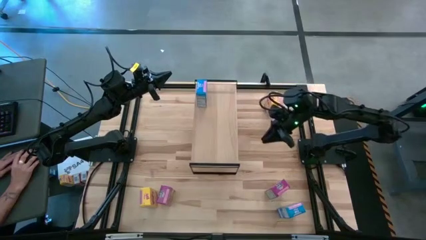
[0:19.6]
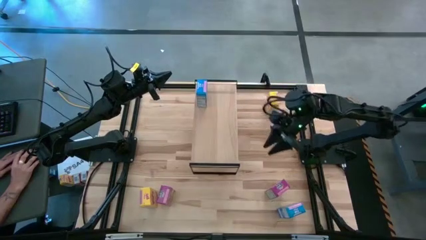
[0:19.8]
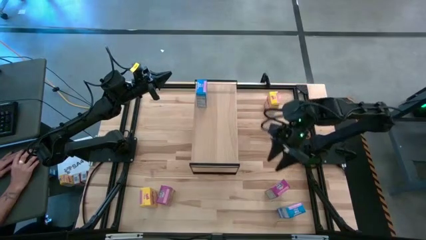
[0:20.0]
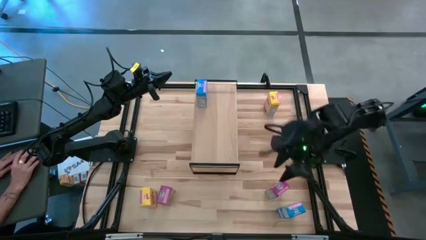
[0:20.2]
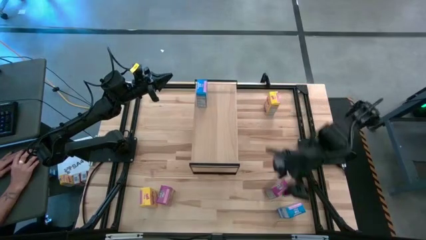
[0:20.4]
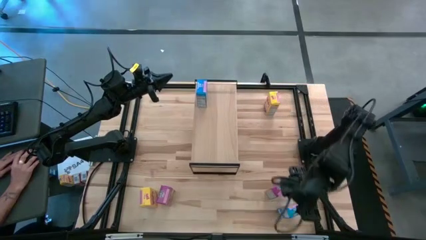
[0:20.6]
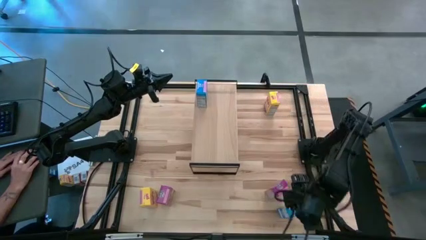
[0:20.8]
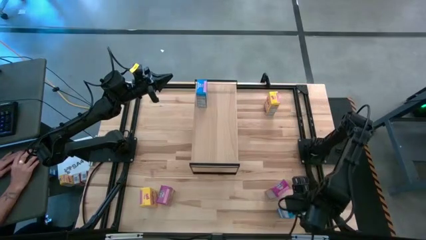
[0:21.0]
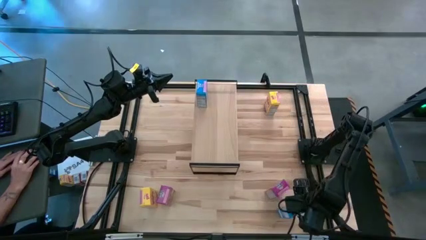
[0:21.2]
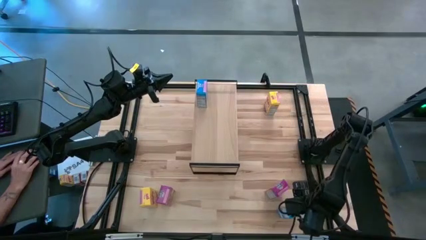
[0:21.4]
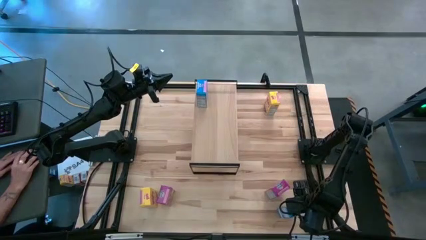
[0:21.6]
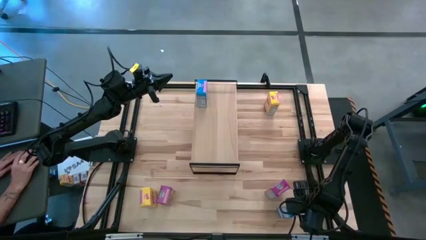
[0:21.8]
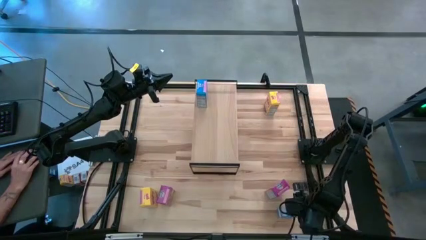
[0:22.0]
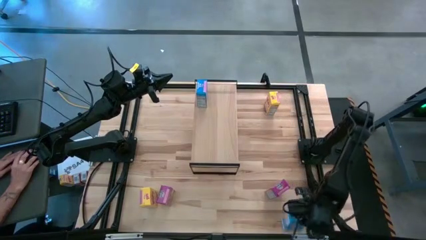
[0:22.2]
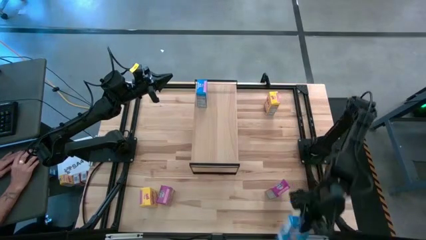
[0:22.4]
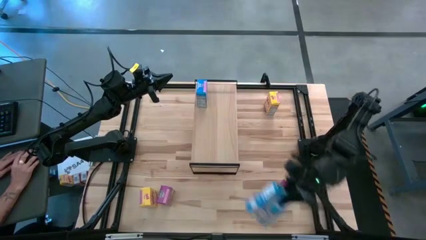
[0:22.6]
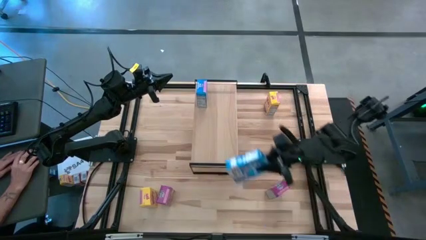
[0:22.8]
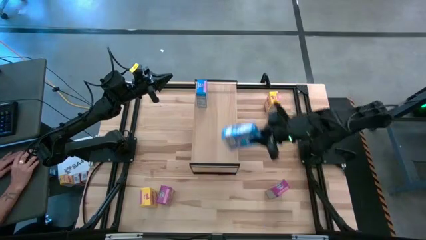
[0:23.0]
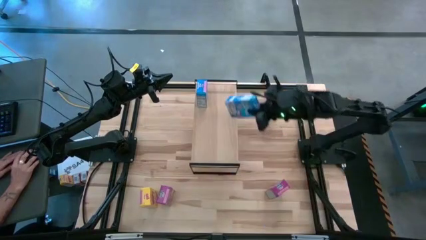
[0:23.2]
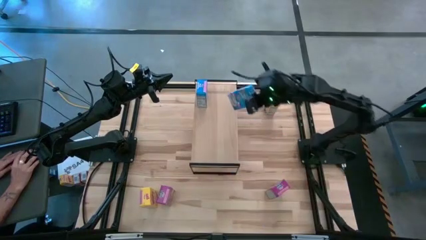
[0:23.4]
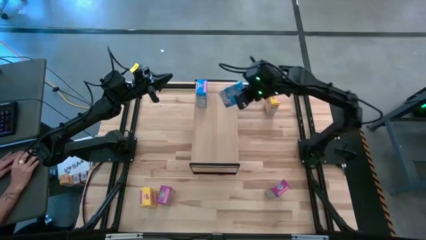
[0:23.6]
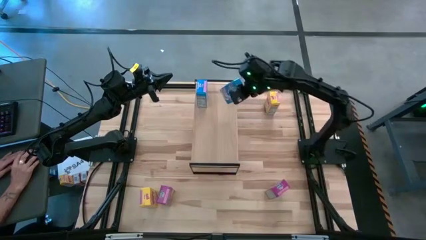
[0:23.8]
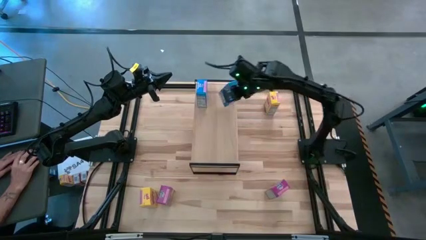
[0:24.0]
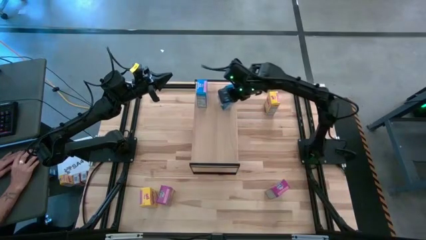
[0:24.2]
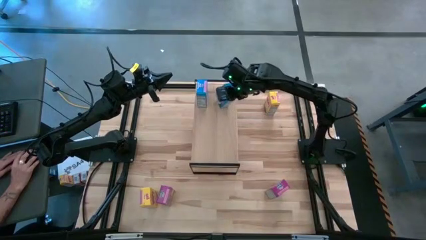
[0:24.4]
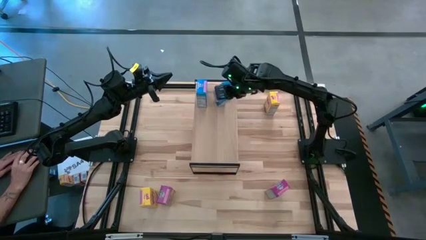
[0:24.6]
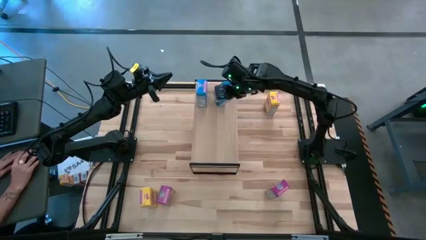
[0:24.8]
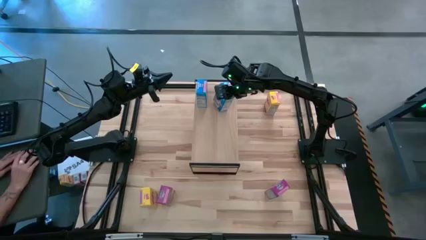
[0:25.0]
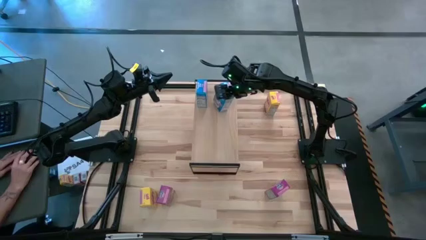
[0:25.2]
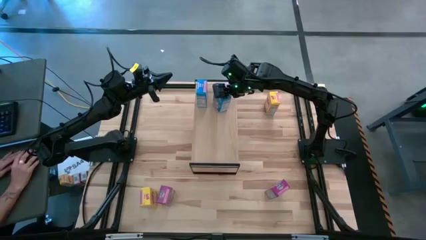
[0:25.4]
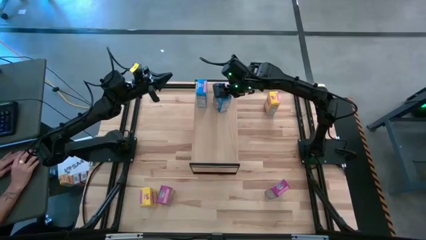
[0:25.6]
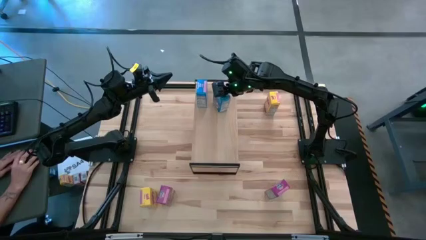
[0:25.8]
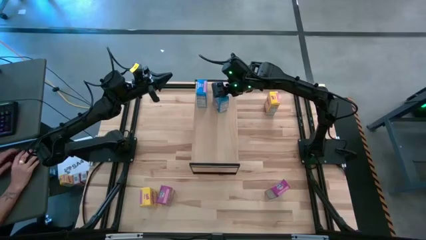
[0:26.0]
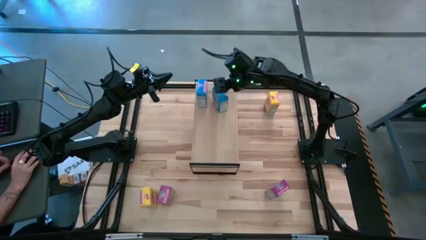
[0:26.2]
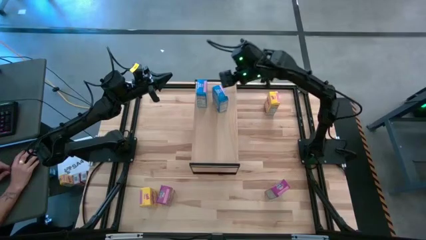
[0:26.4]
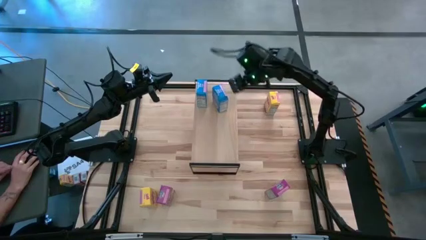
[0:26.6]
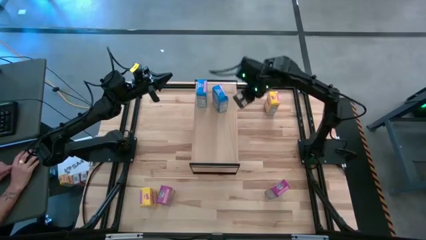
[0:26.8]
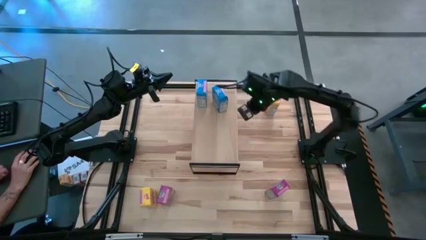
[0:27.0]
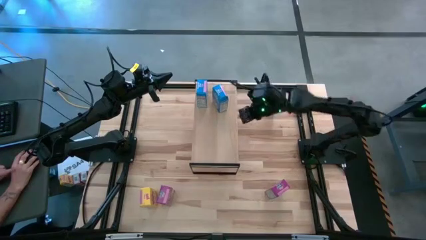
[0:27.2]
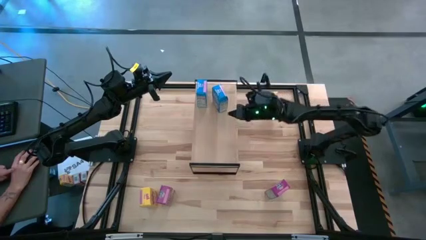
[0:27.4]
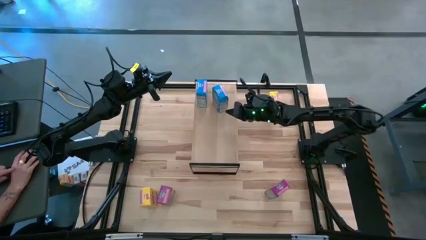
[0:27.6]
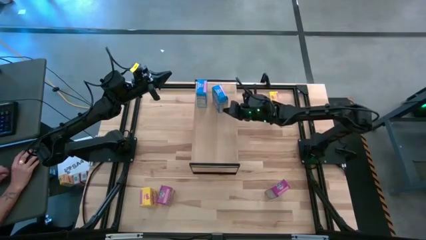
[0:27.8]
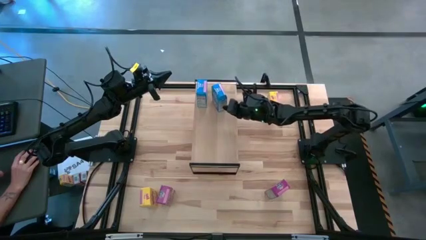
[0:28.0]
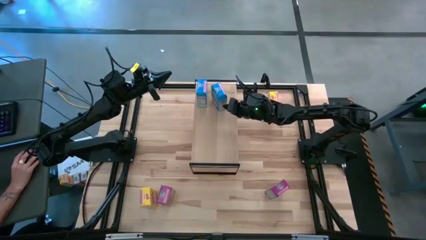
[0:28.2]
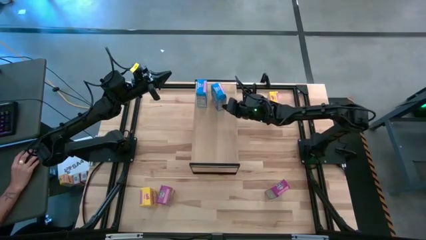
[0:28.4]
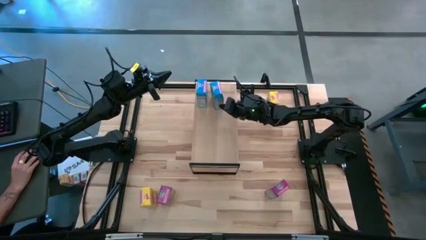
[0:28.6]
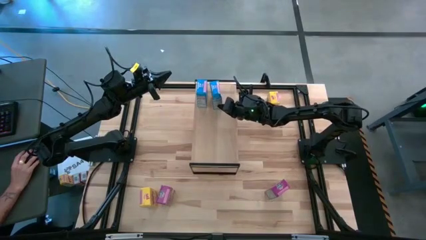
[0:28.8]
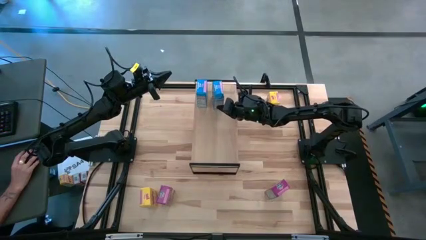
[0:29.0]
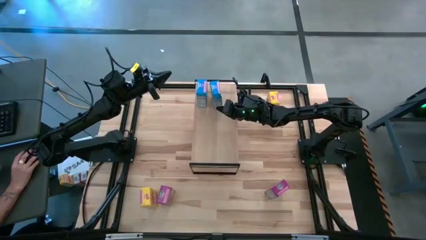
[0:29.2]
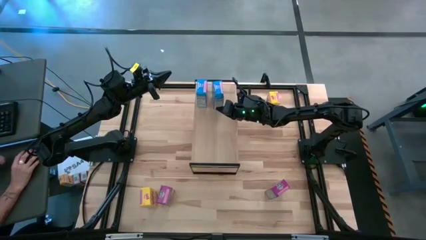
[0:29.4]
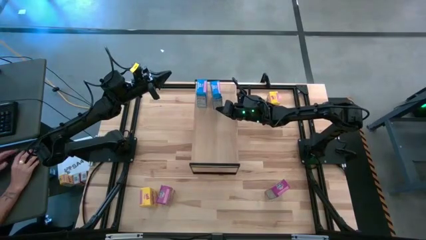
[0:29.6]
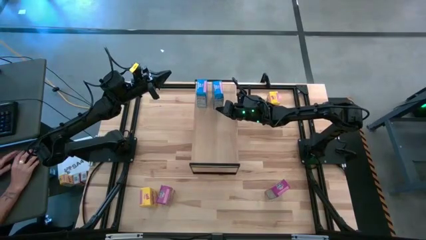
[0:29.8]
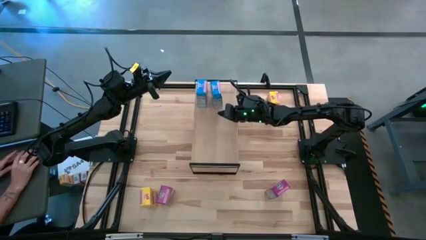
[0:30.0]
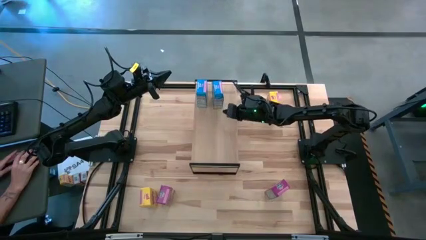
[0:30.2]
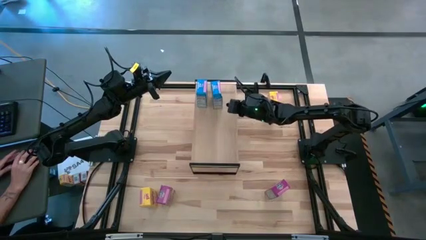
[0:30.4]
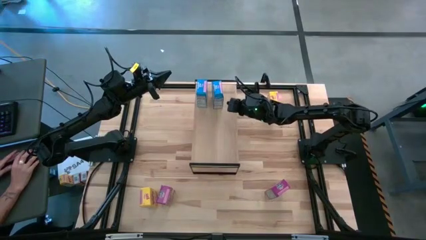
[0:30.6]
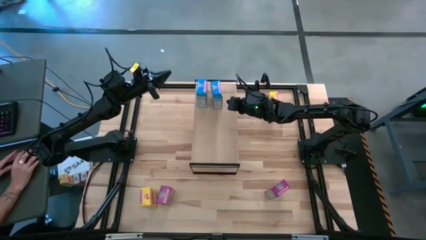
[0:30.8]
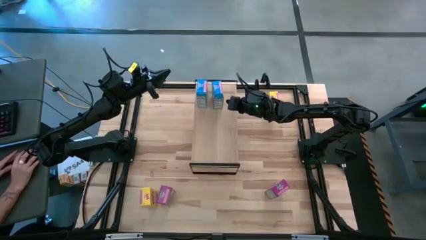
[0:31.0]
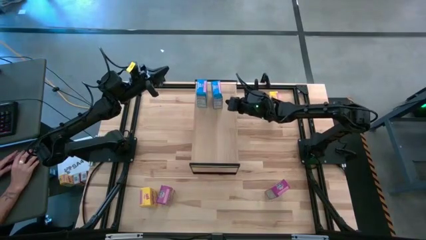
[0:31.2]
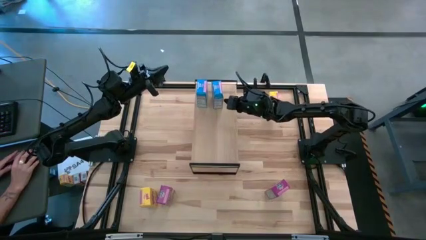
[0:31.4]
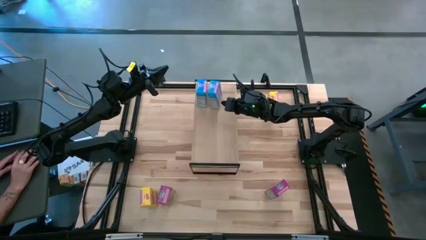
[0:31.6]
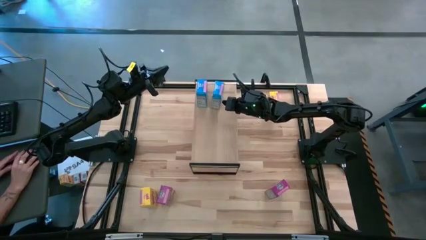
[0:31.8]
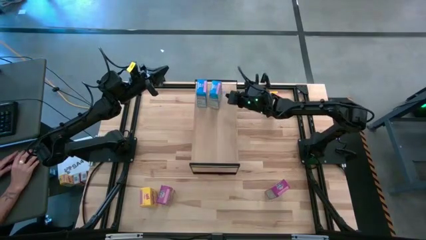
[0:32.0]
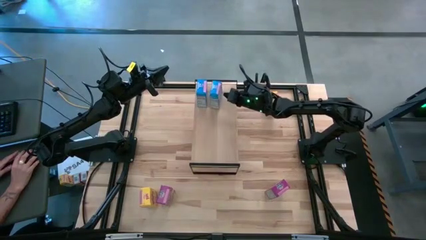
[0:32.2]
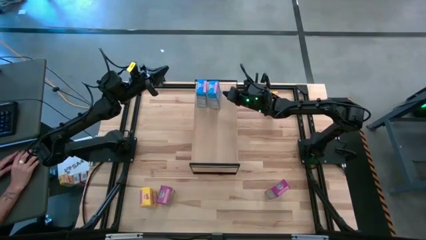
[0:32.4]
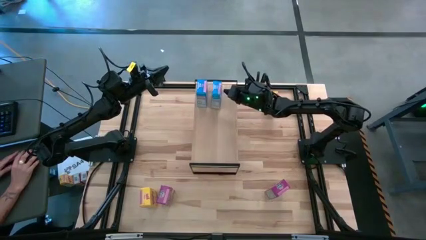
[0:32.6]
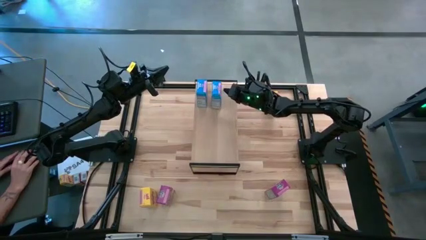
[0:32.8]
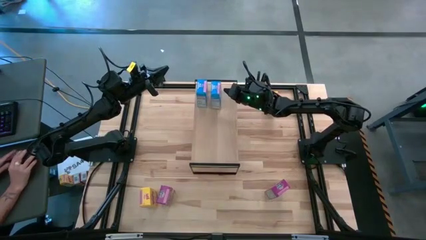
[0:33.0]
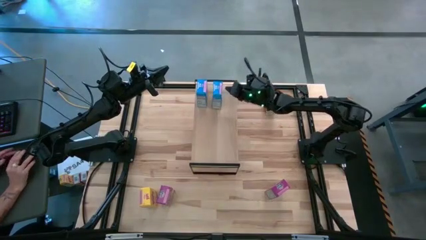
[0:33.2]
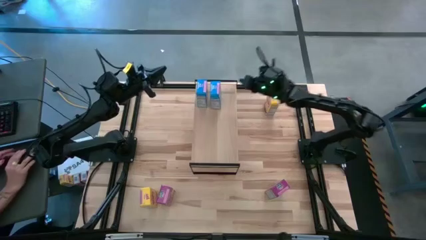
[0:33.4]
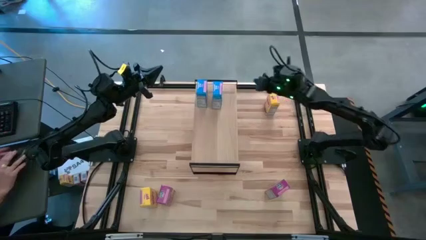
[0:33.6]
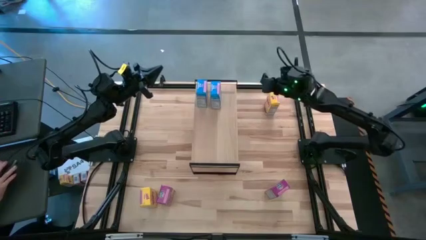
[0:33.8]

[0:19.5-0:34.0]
Task: Stack cereal on shelf
Put the blue cereal box on the shelf
